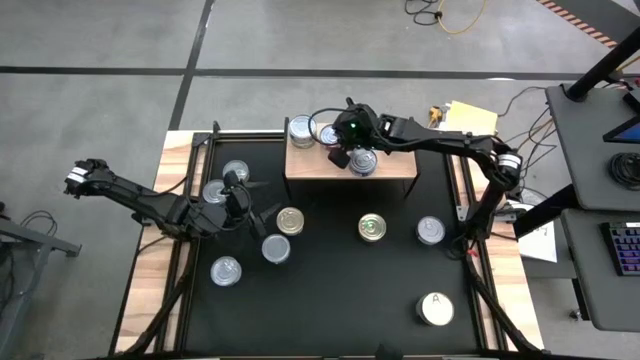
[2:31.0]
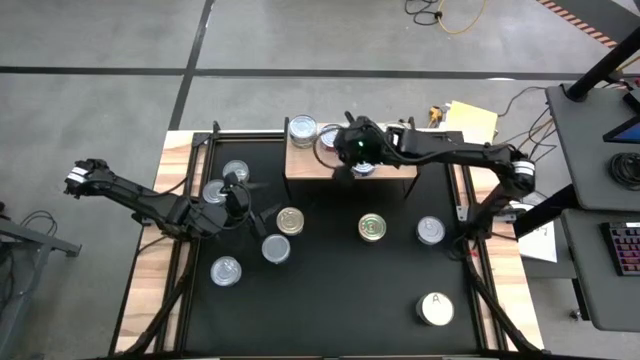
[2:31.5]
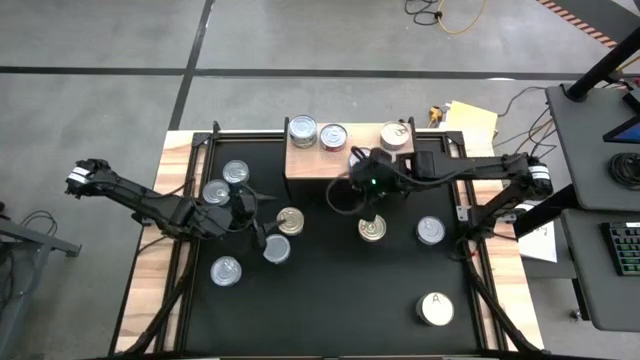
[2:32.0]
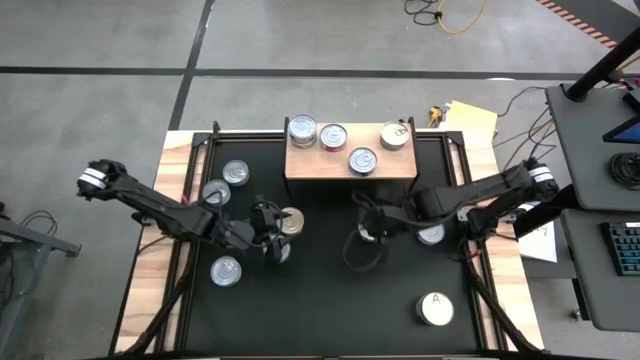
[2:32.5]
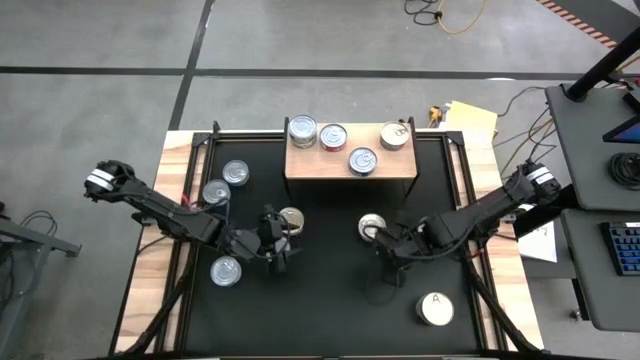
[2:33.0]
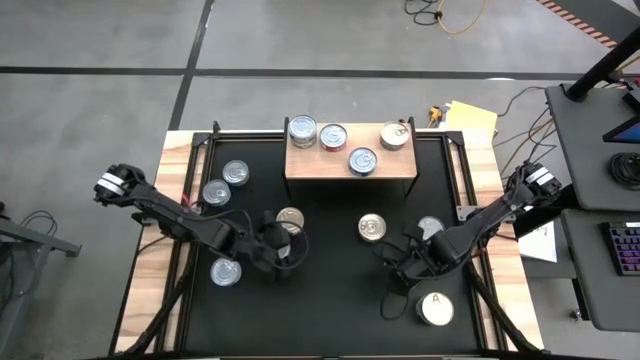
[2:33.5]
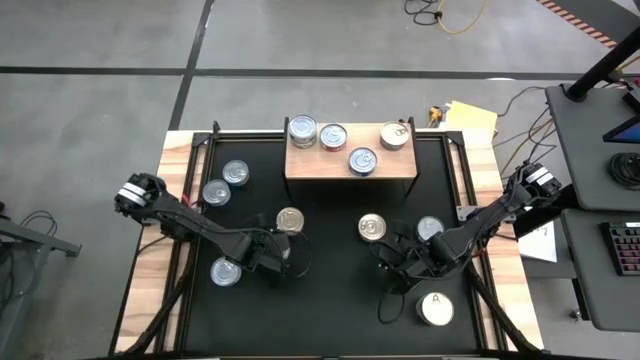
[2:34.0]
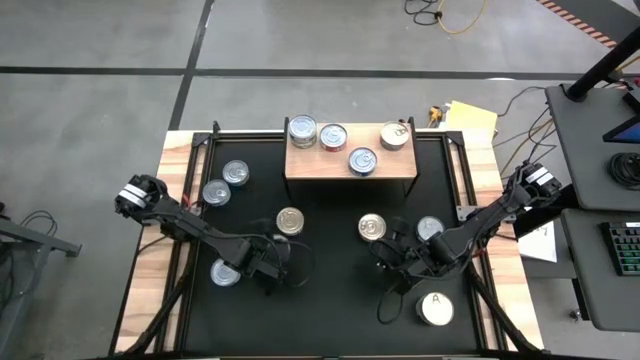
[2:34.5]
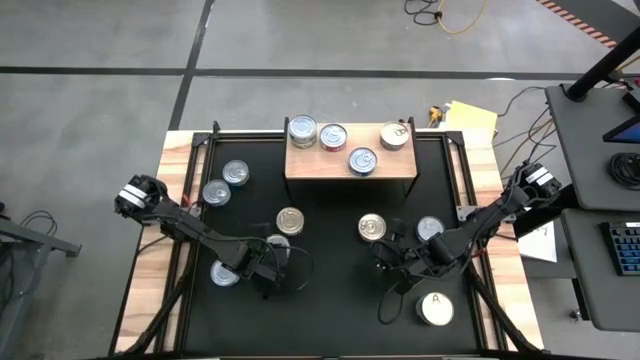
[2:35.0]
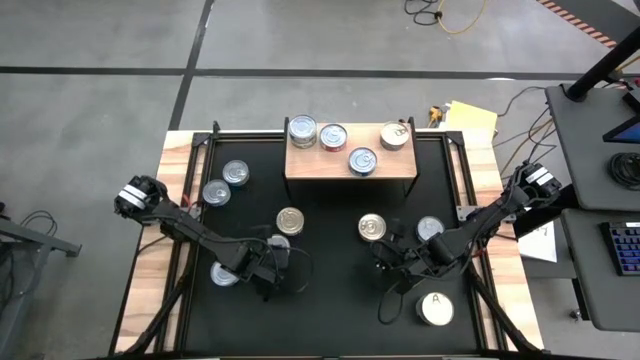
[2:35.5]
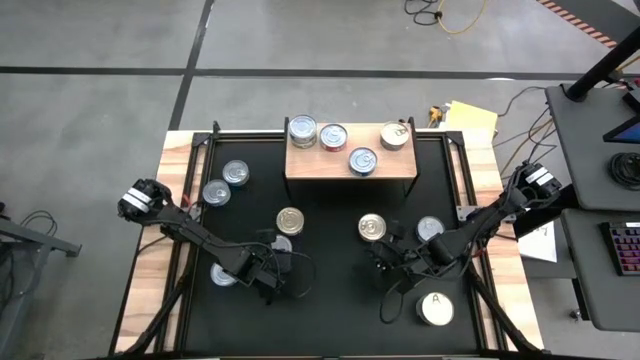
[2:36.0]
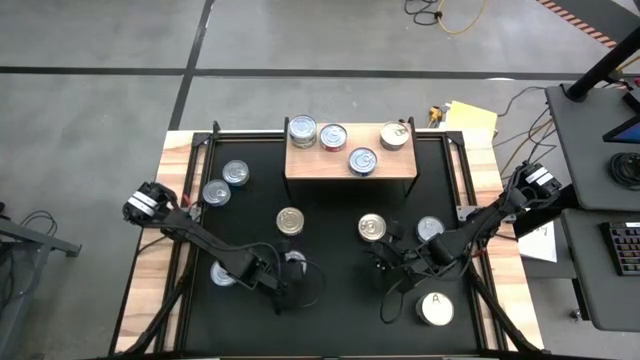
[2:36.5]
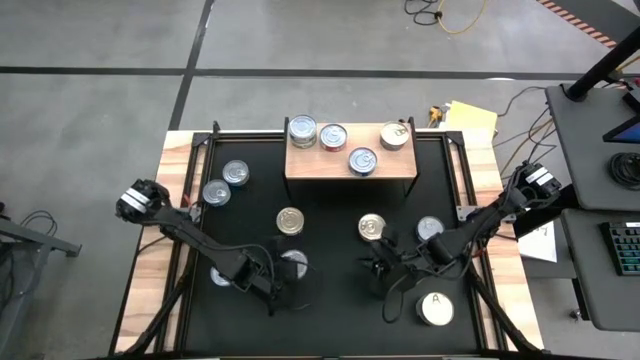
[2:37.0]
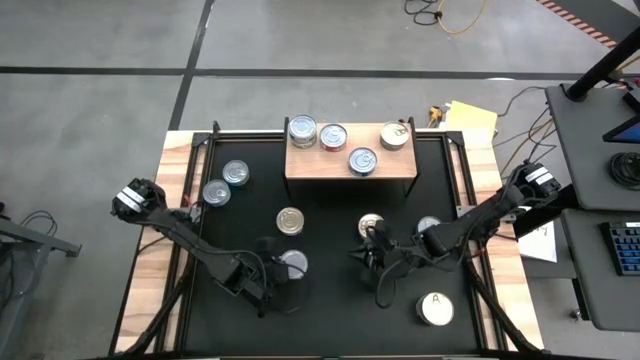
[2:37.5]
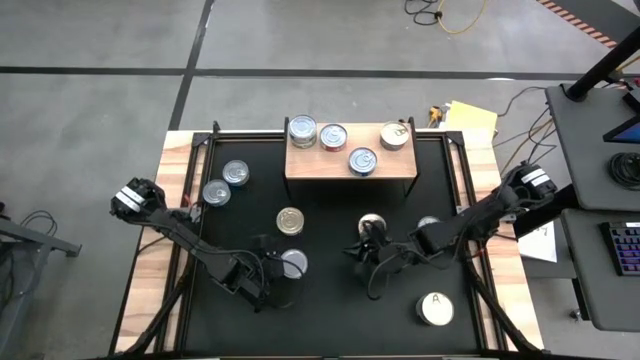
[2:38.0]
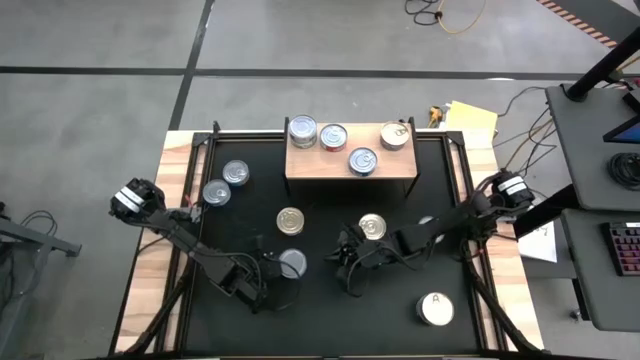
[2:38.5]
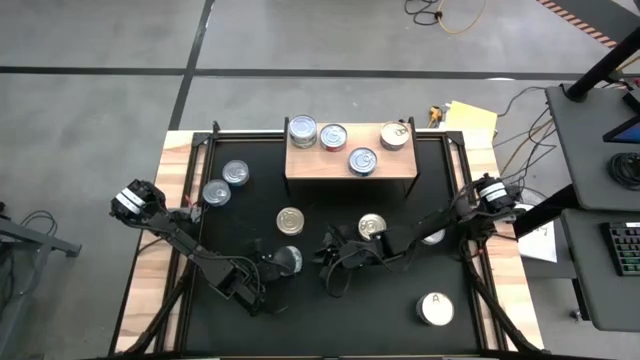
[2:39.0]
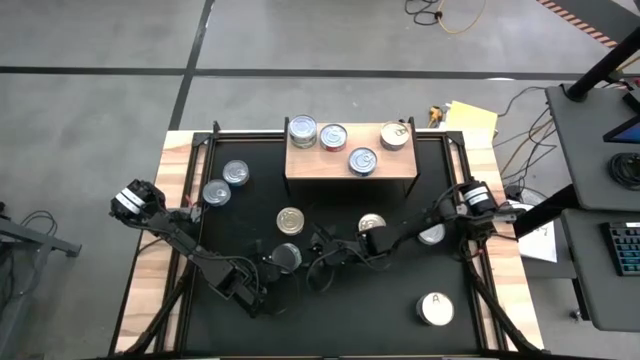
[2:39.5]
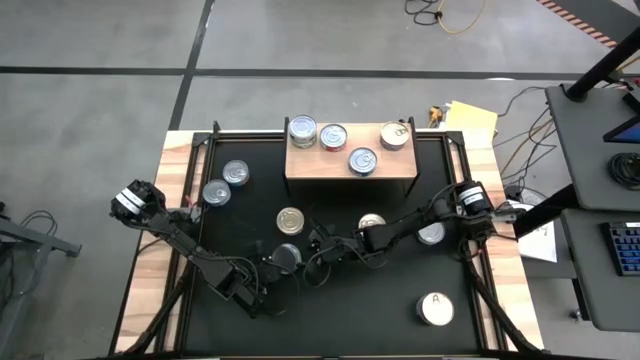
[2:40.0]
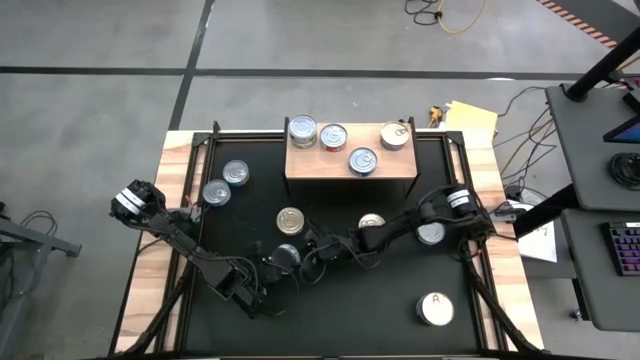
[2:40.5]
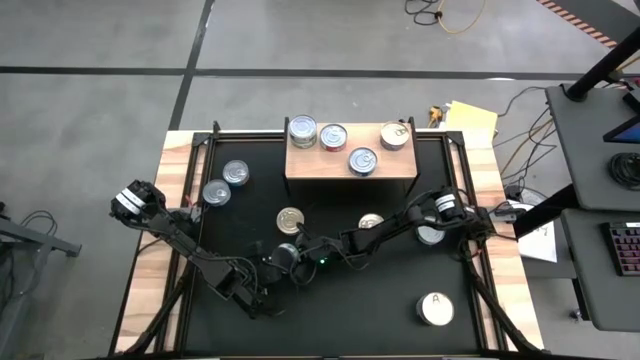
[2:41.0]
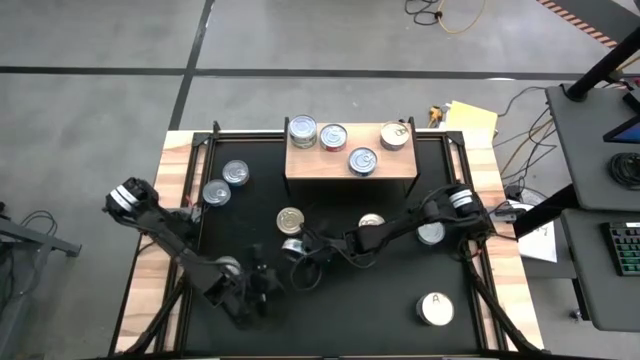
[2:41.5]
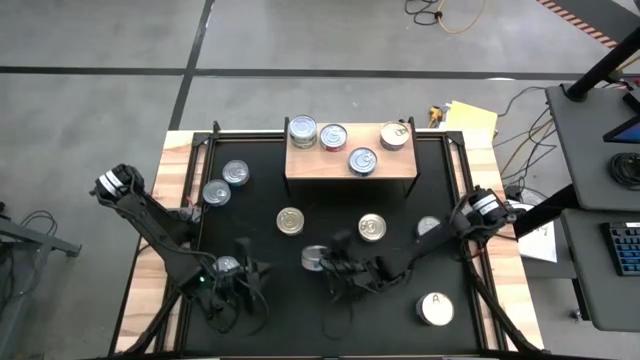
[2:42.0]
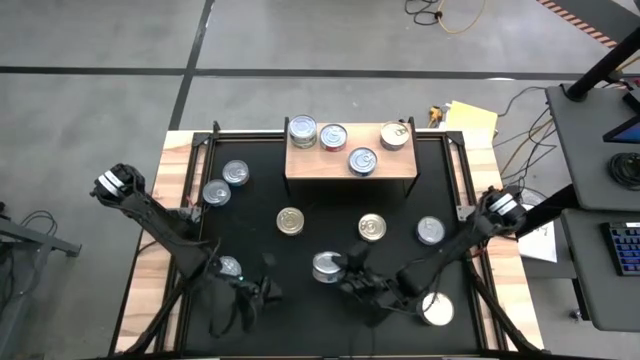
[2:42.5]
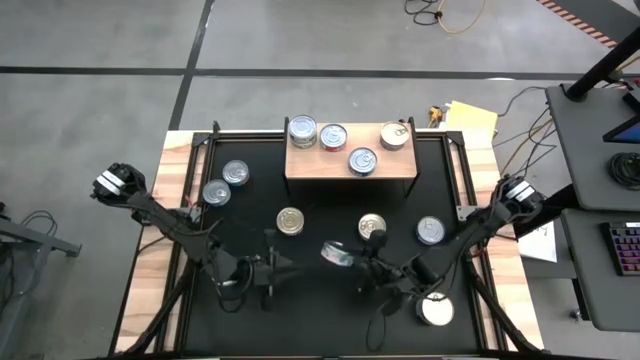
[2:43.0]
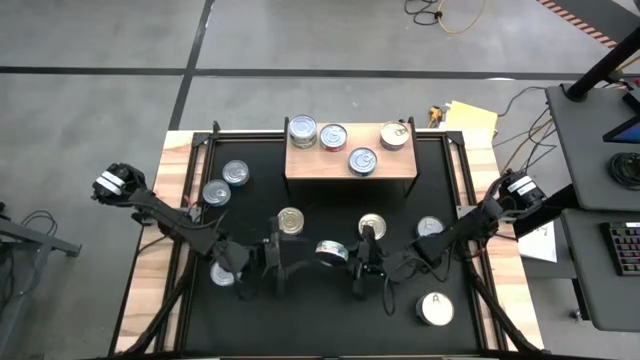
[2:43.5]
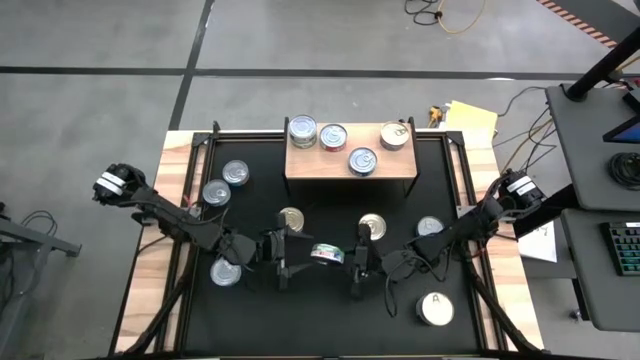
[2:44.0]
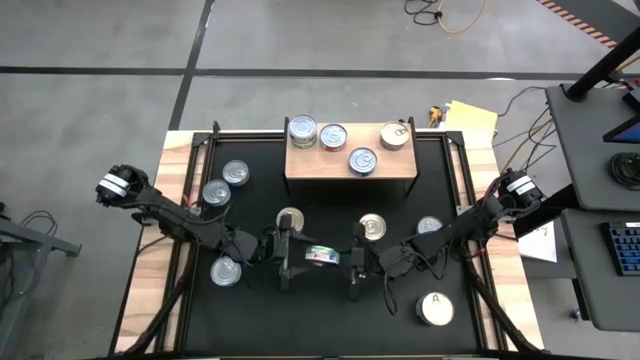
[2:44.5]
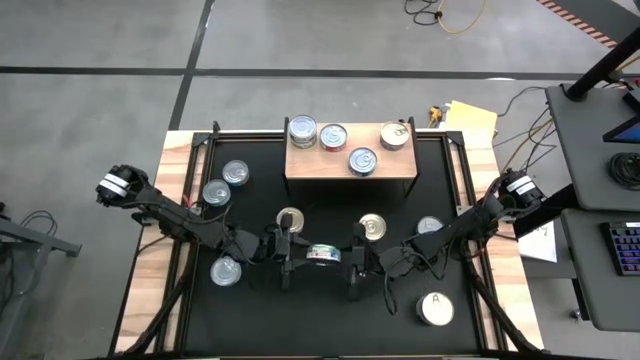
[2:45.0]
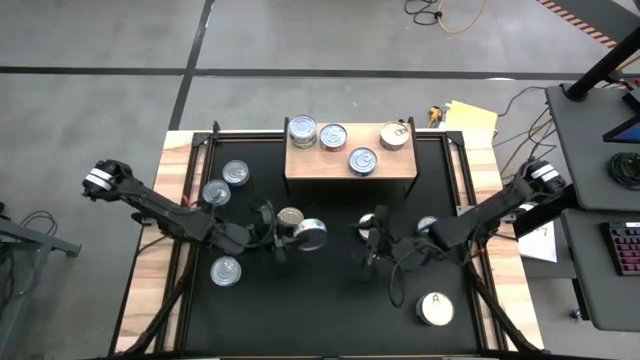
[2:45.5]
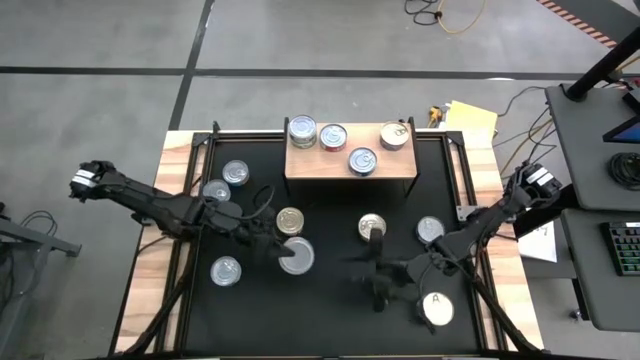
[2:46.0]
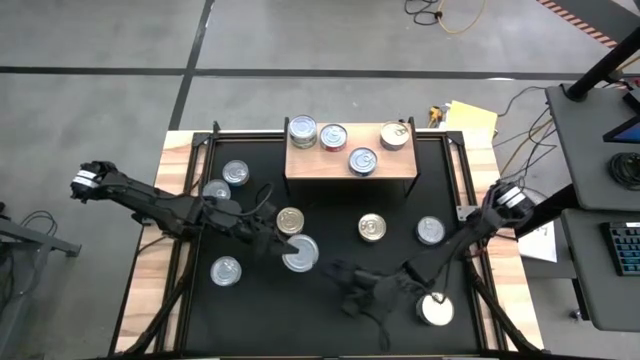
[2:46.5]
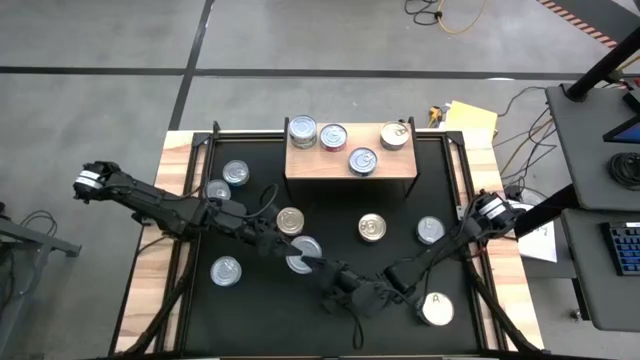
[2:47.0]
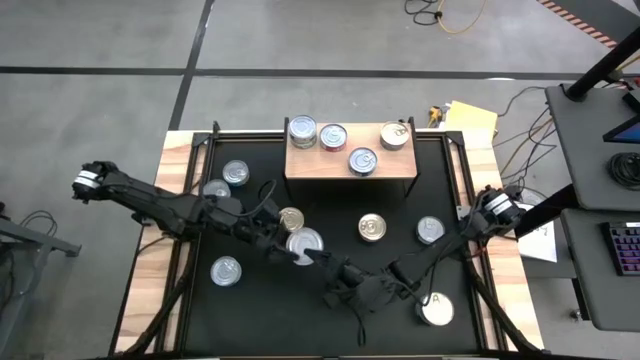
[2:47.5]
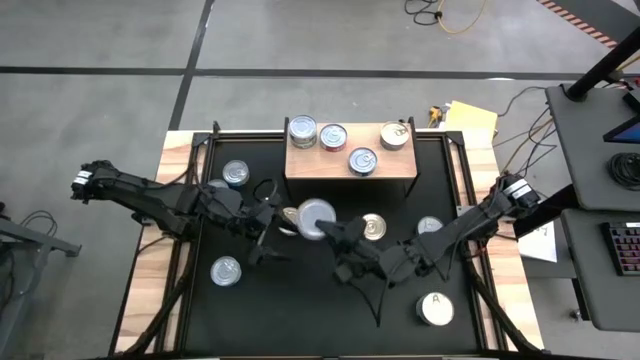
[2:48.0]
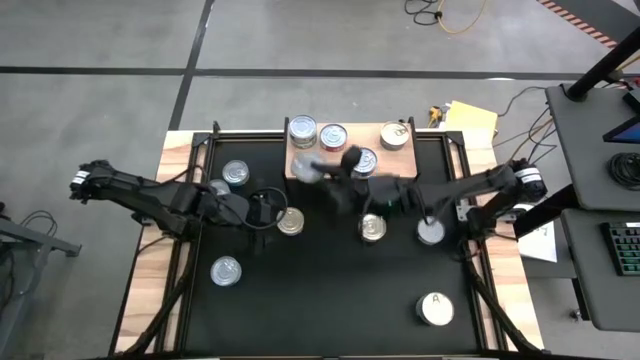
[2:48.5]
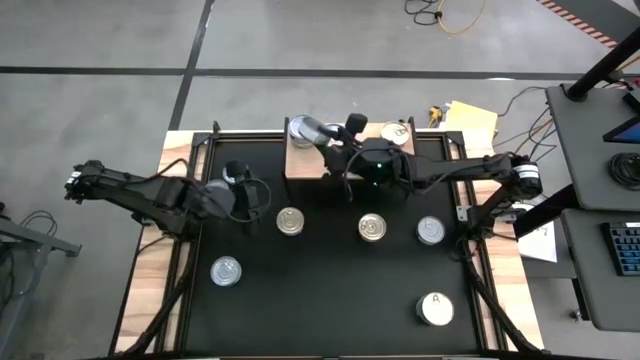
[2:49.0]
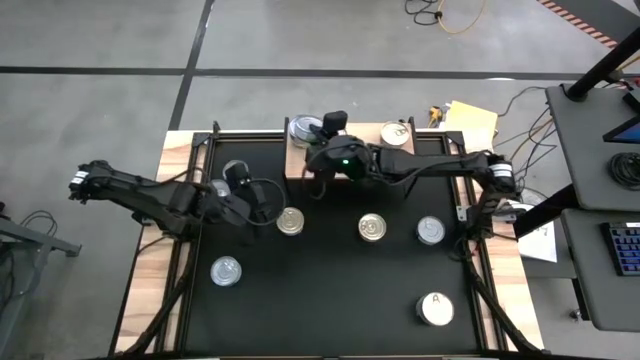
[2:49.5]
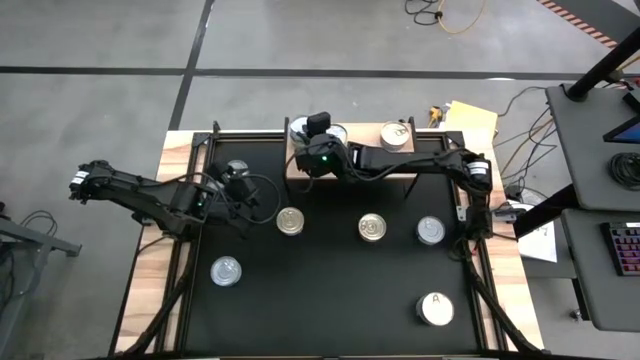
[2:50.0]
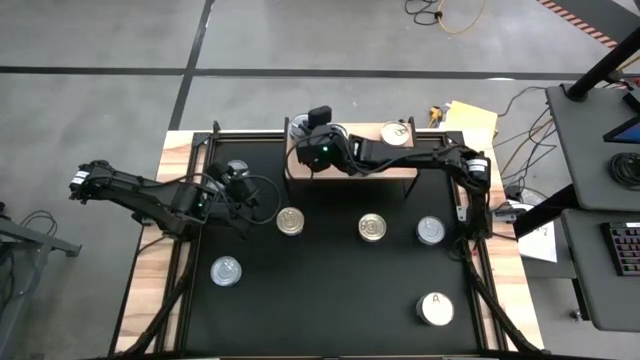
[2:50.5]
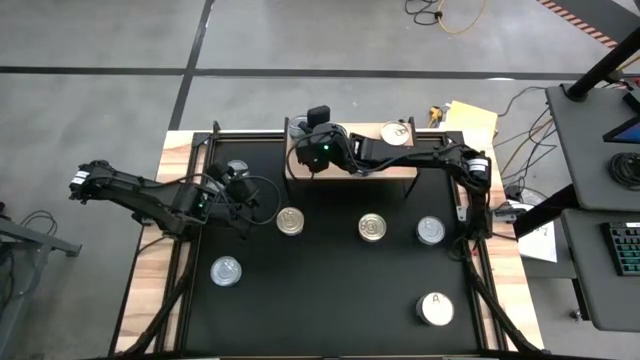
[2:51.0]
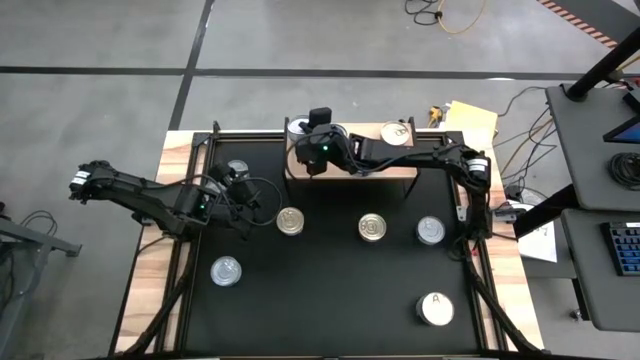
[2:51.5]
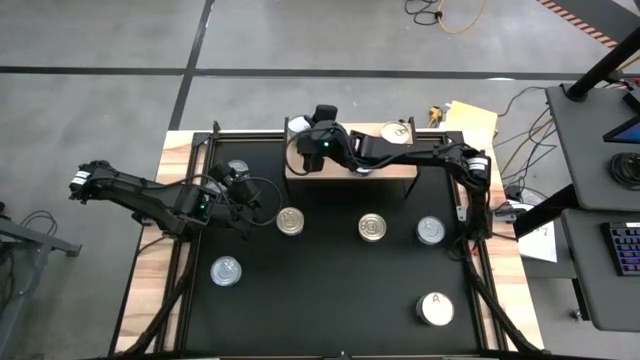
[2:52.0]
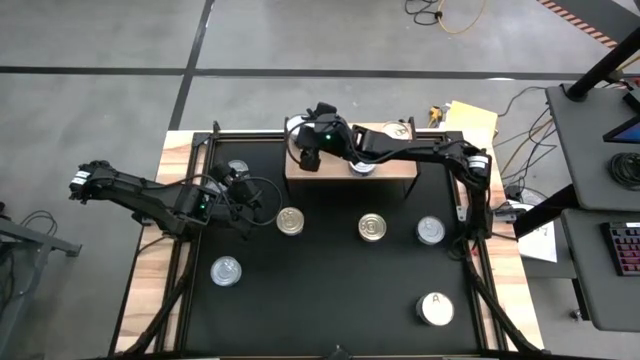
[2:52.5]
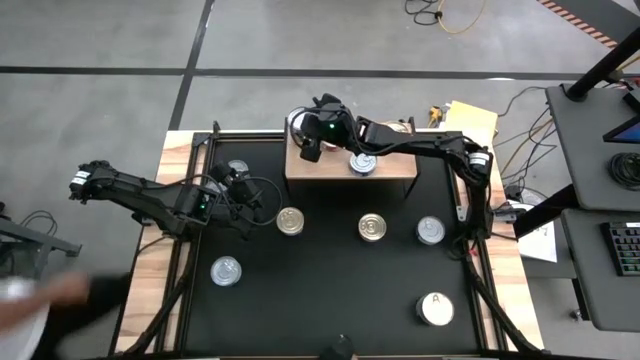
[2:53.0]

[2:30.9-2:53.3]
Task: Stack canned seafood by type on shelf
Stack the green white tuna can on top of the green white tuna can on the shelf
